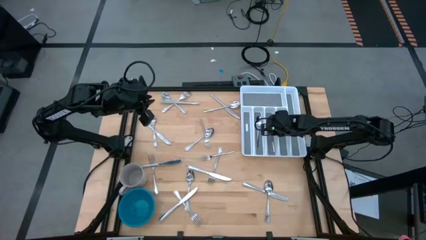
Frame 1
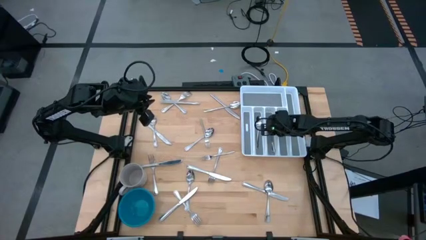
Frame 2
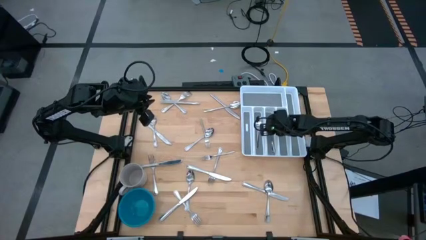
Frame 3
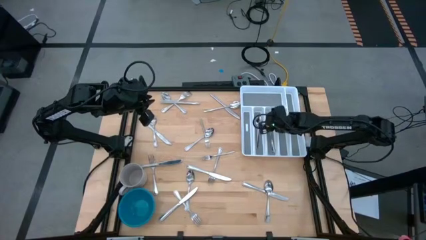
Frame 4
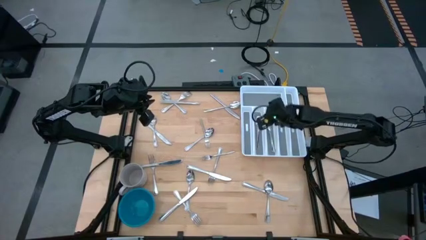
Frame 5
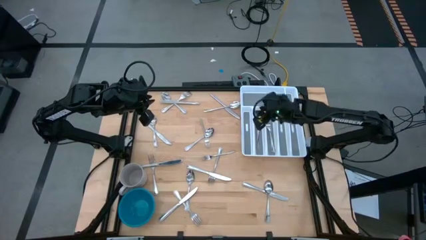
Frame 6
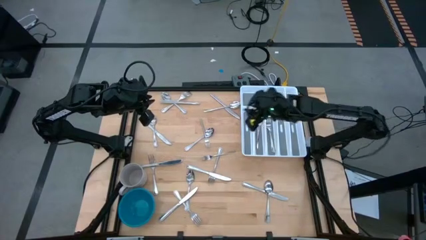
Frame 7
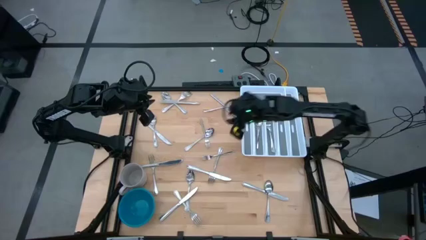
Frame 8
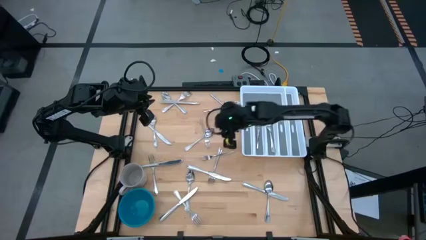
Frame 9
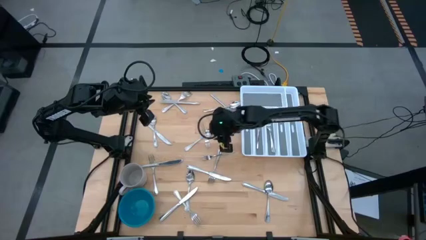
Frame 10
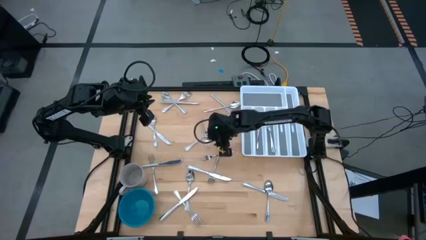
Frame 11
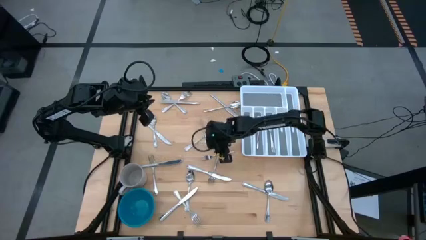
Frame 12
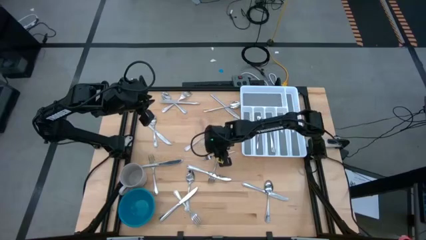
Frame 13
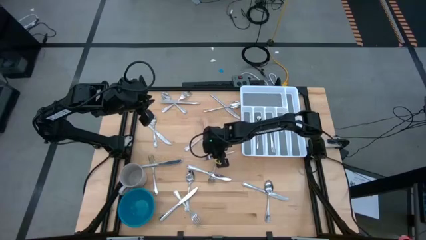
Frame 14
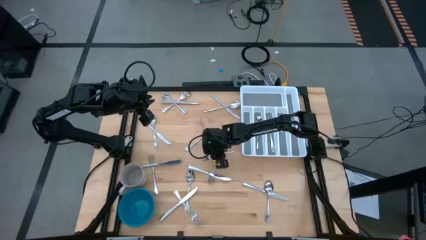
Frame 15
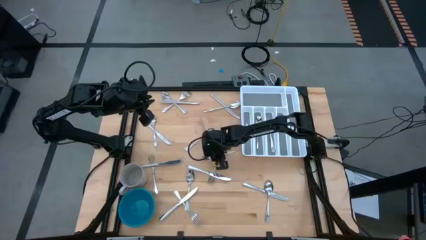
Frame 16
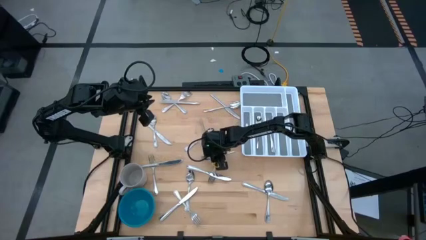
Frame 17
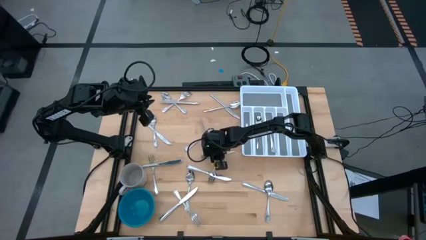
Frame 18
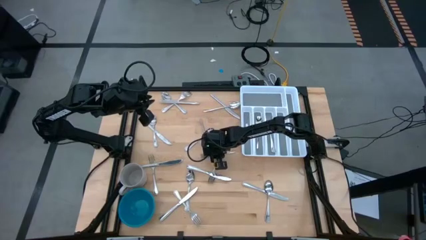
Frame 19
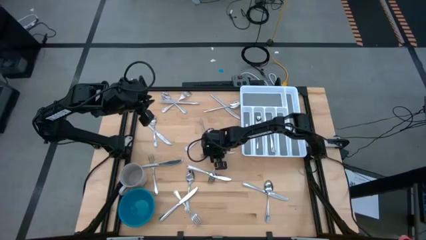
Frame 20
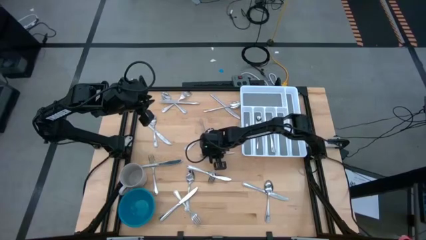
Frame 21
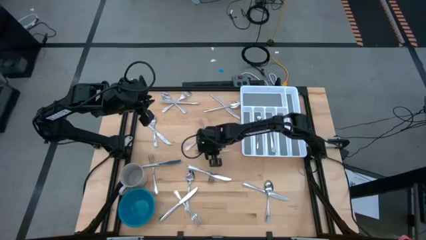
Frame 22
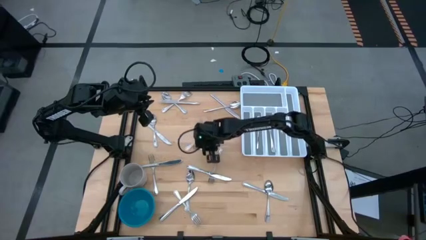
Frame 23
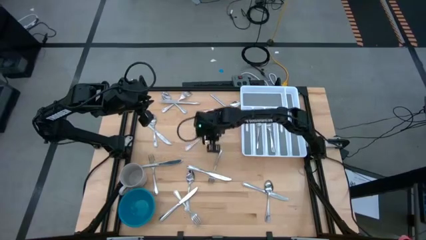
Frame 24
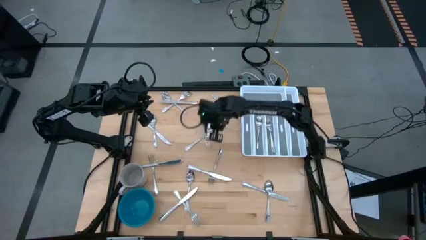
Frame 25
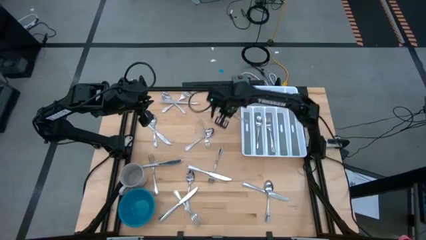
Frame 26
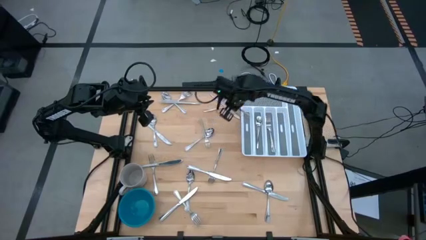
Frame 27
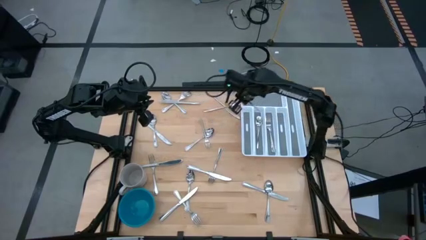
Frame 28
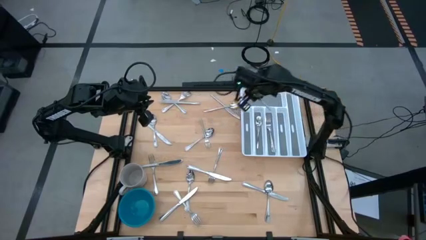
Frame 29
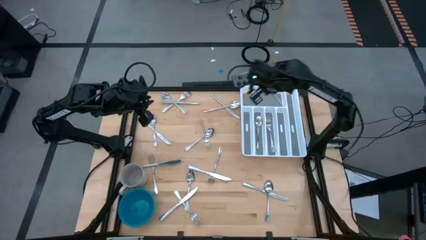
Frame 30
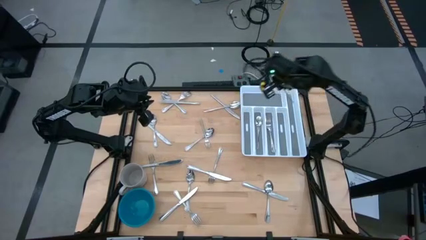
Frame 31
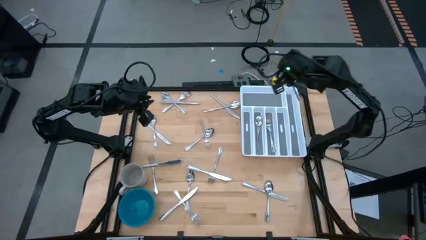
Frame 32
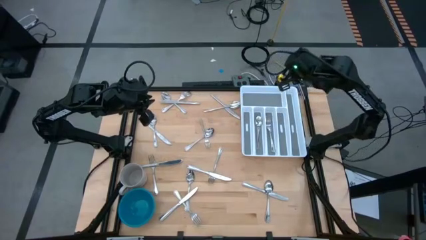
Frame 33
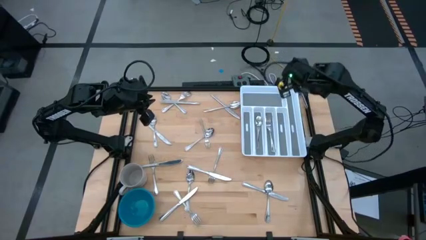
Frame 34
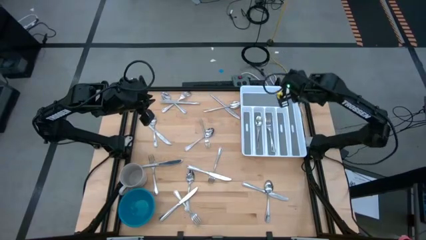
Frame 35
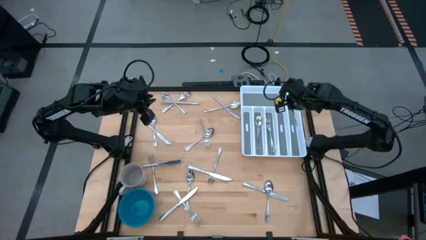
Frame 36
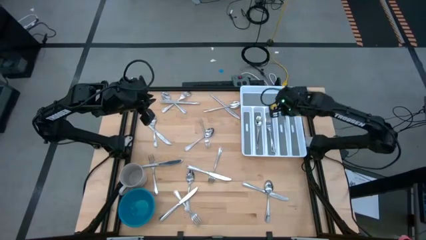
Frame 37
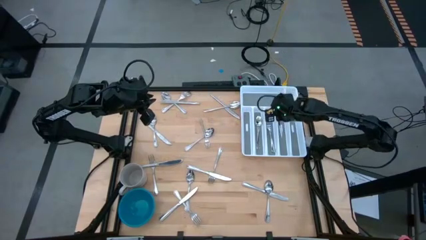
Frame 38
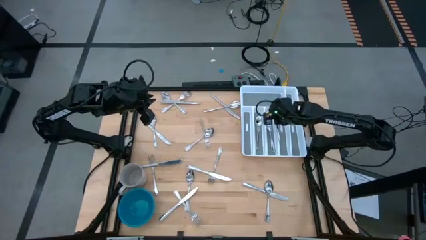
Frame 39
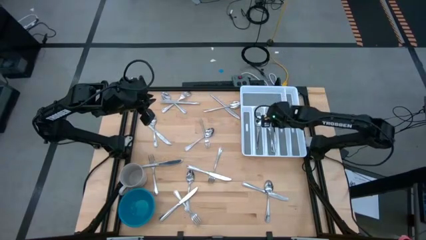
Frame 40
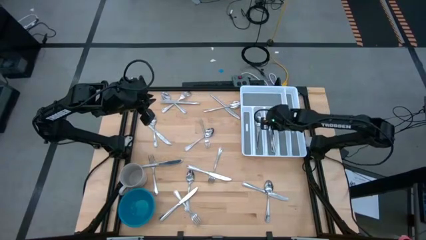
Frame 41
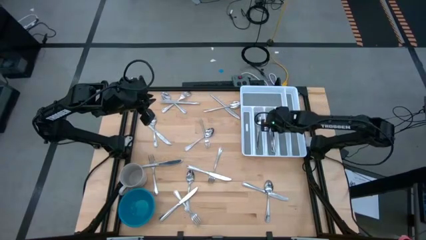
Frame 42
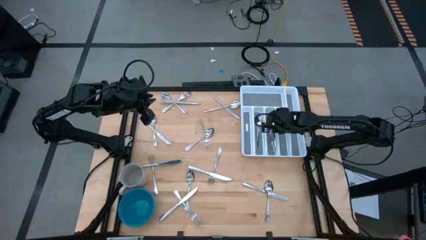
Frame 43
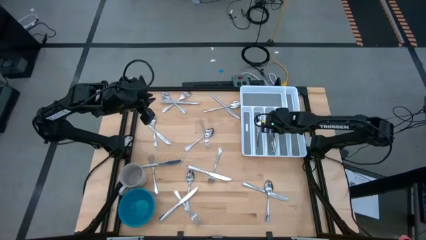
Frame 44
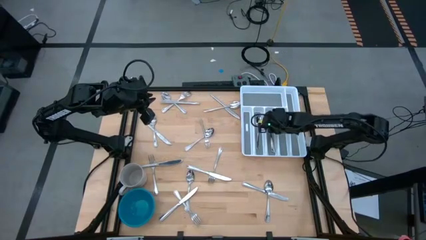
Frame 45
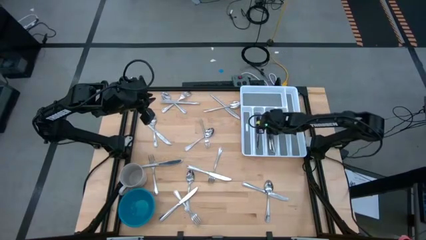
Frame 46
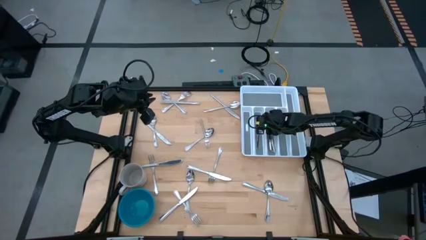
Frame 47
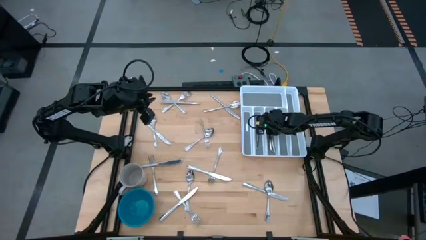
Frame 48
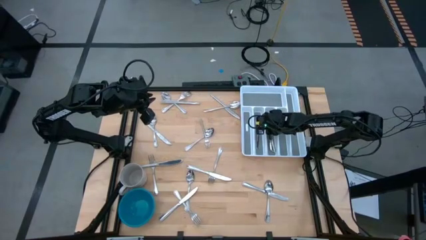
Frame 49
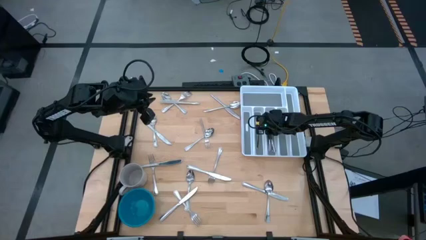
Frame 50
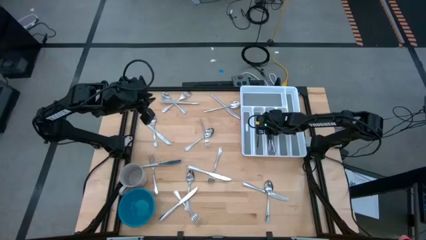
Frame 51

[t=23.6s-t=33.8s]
Task: Sort silverware
Put the fork into the silverware tray
